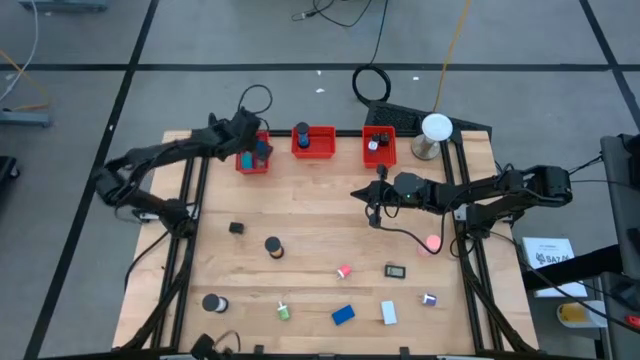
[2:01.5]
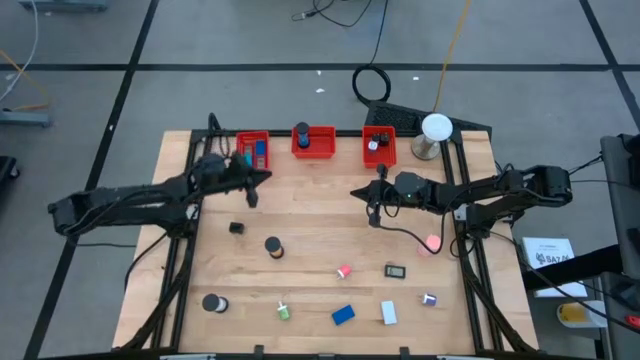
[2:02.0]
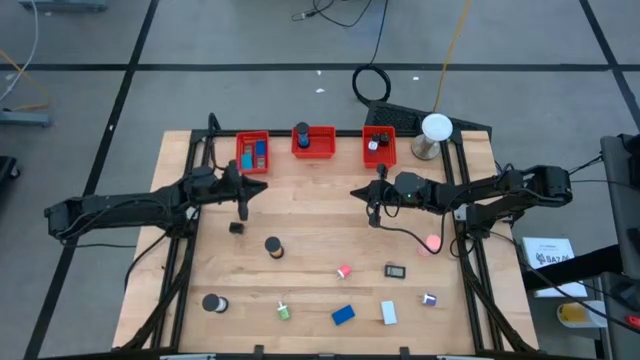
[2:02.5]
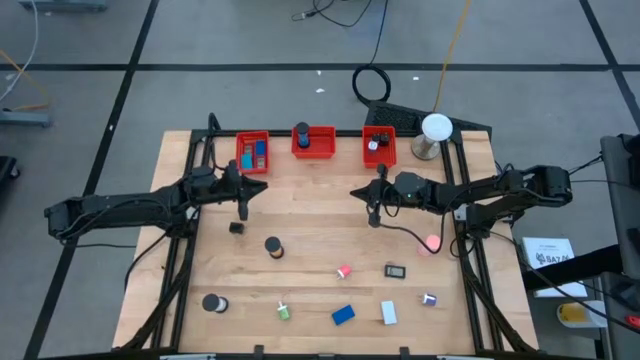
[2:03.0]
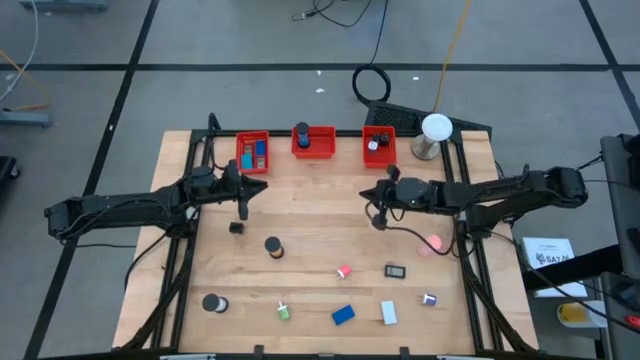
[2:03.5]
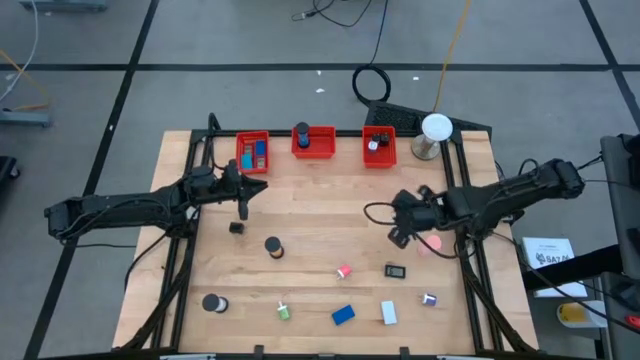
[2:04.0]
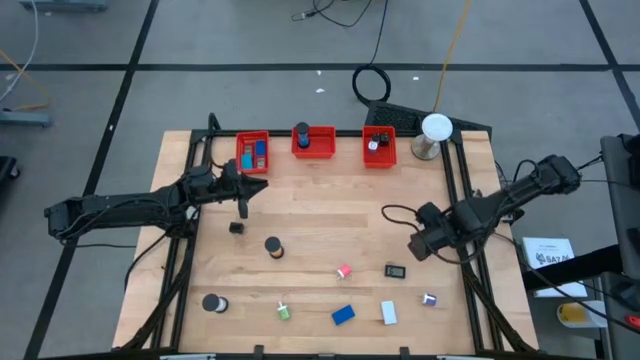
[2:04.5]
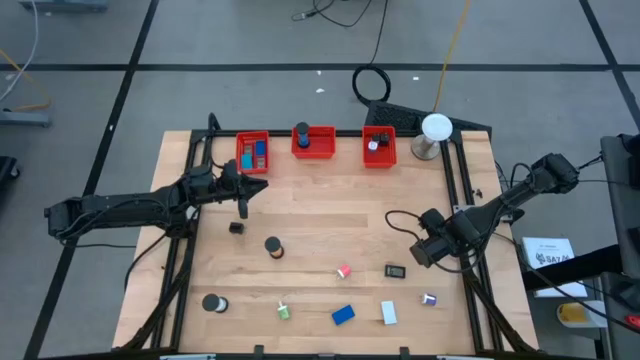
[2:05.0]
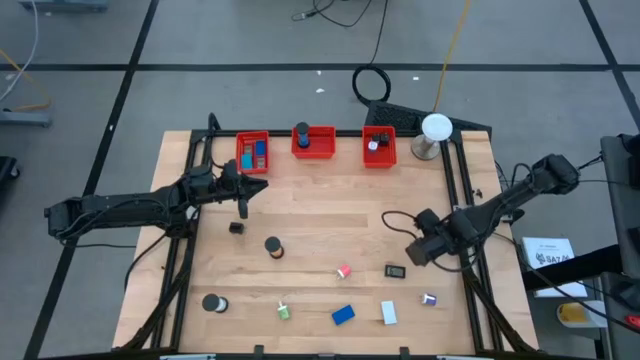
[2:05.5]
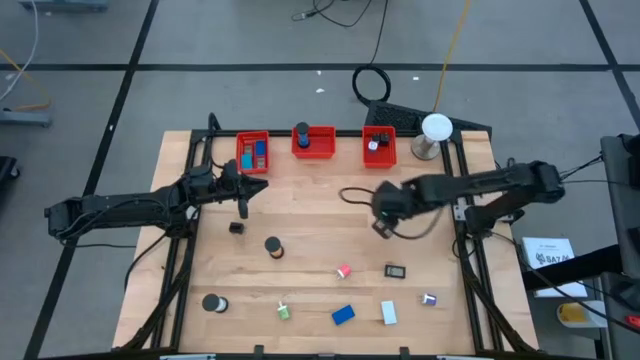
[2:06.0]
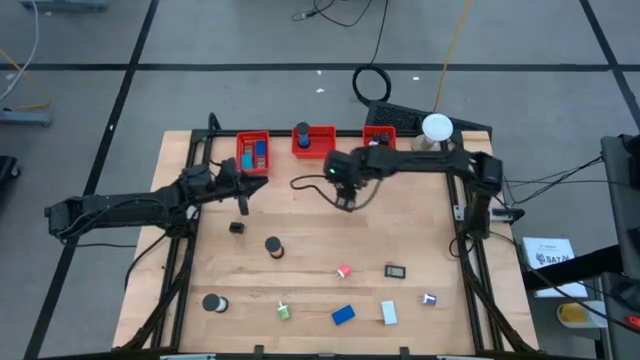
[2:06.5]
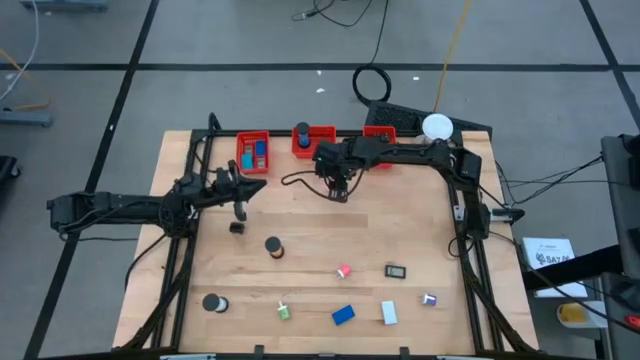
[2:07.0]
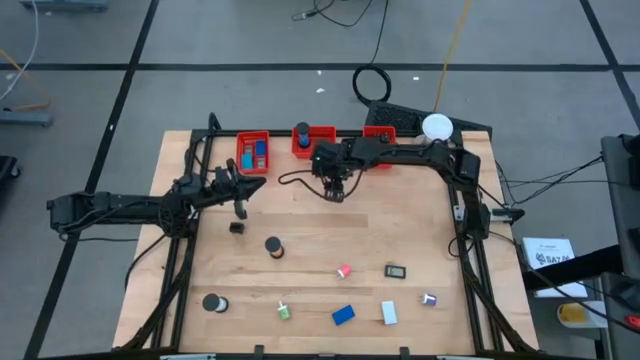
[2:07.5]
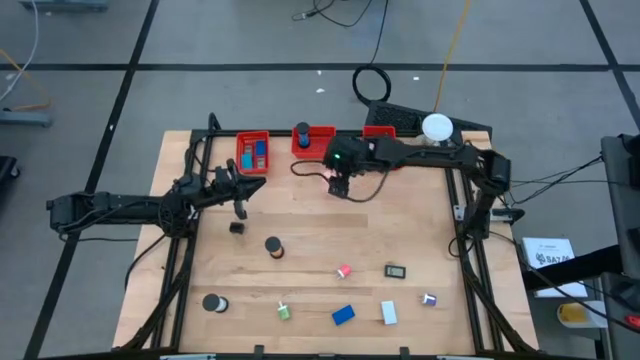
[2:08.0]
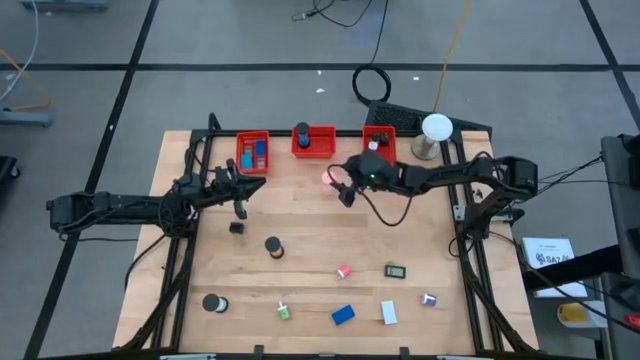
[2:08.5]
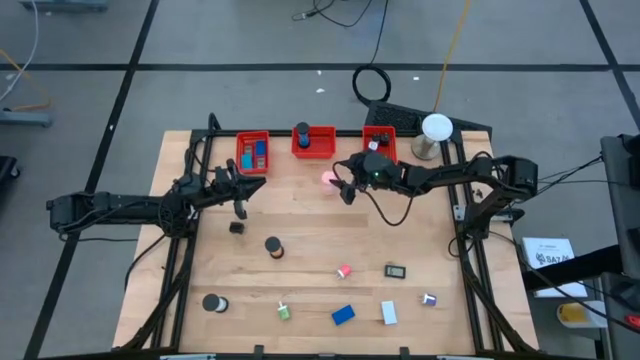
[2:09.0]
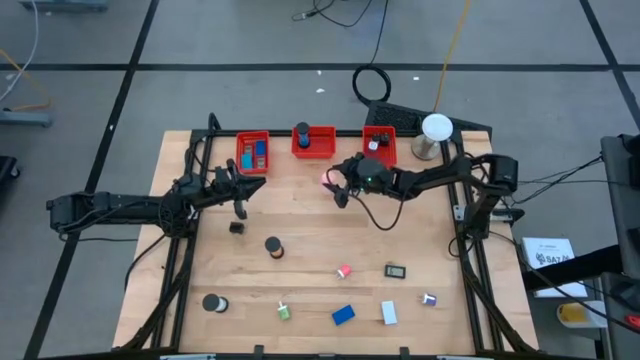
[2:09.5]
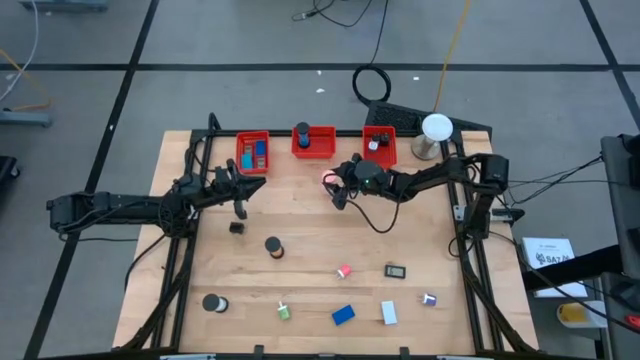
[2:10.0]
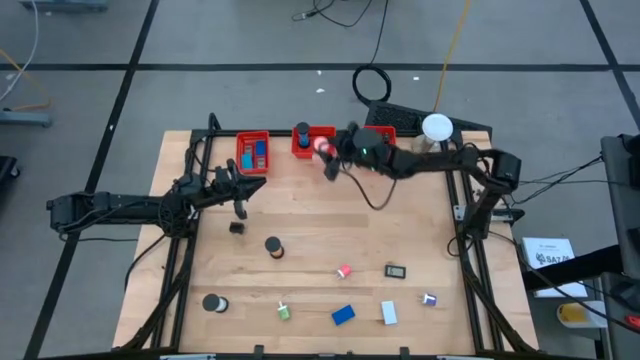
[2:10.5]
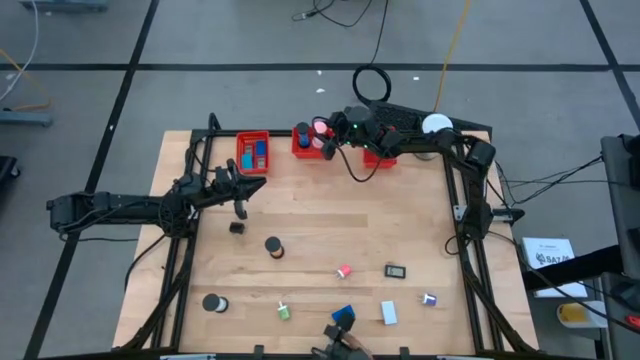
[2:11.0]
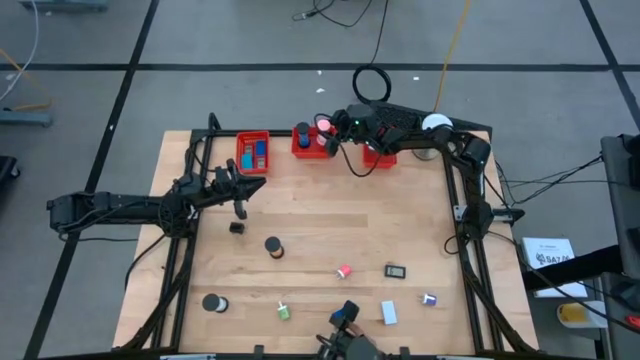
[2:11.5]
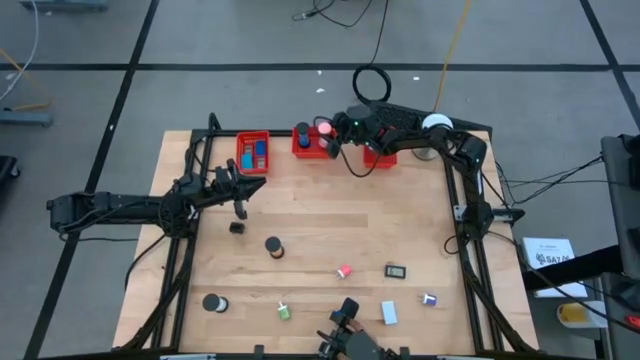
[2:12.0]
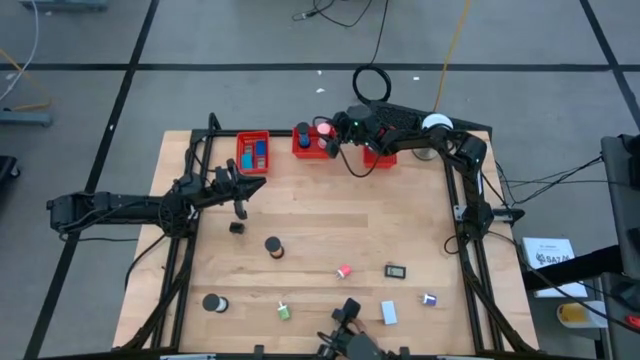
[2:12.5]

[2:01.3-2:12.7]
Task: Pick & Place Office items
Put the pink hourglass into the middle orange basket

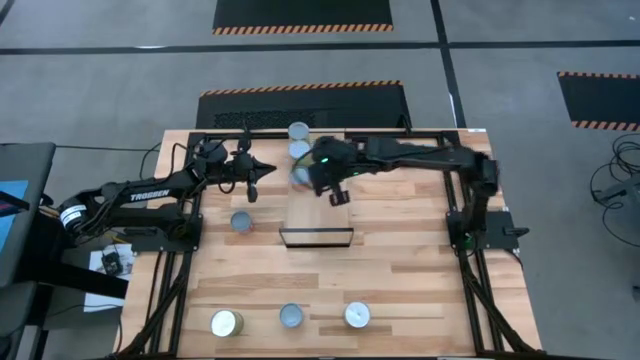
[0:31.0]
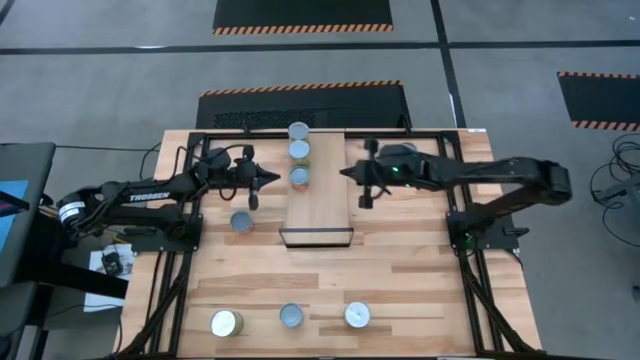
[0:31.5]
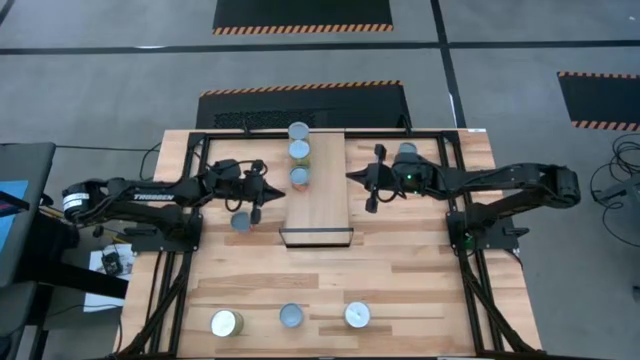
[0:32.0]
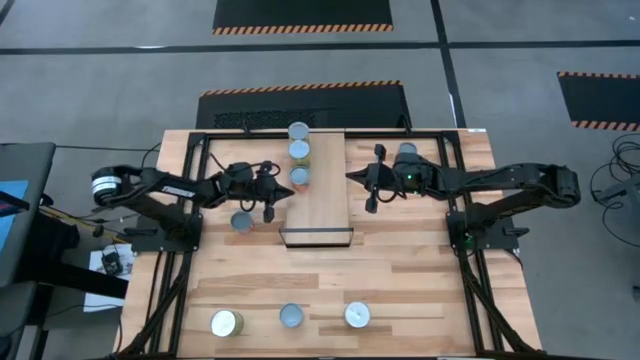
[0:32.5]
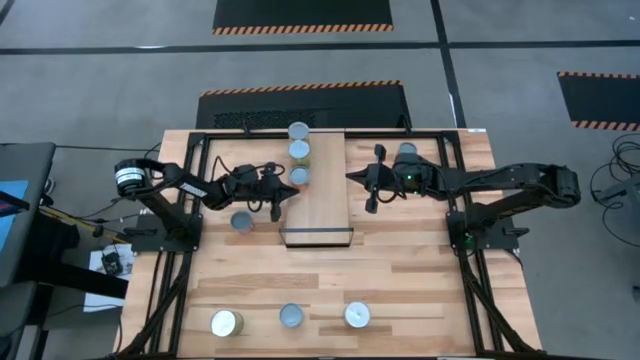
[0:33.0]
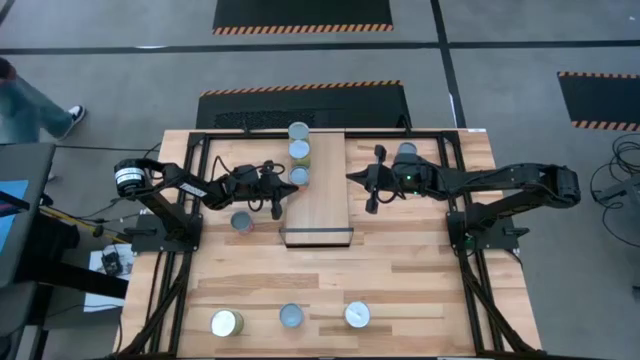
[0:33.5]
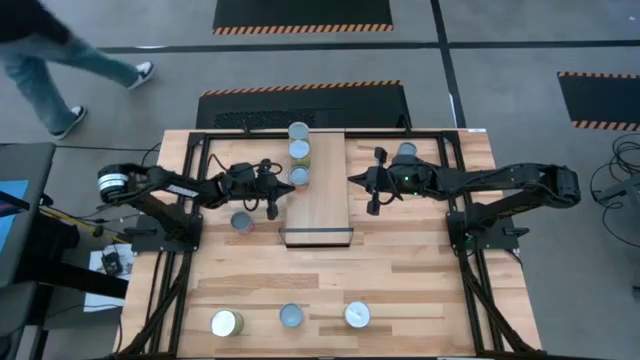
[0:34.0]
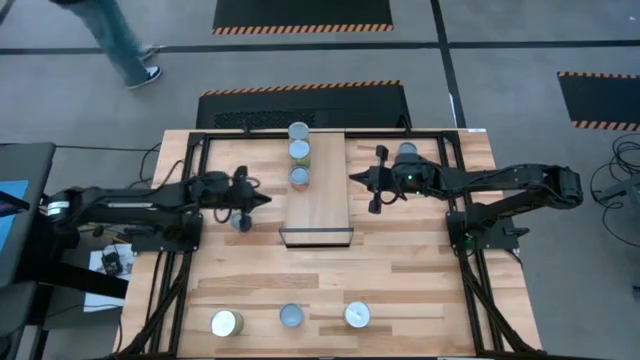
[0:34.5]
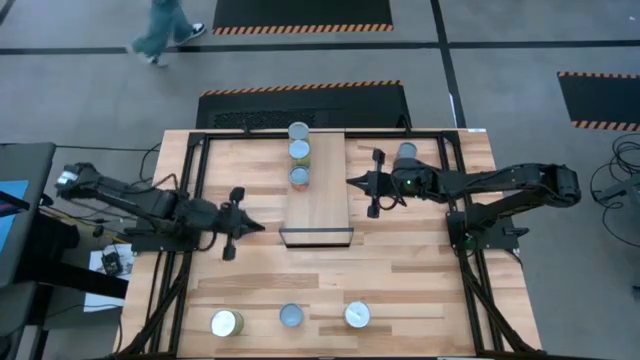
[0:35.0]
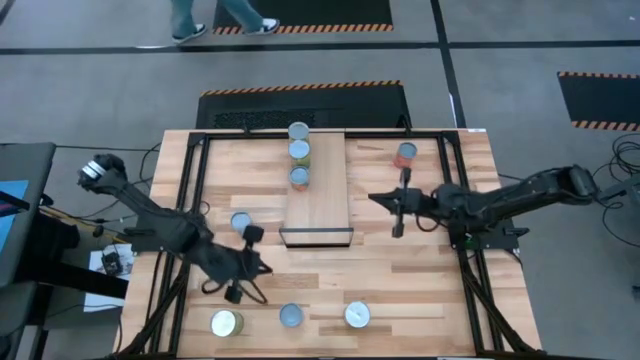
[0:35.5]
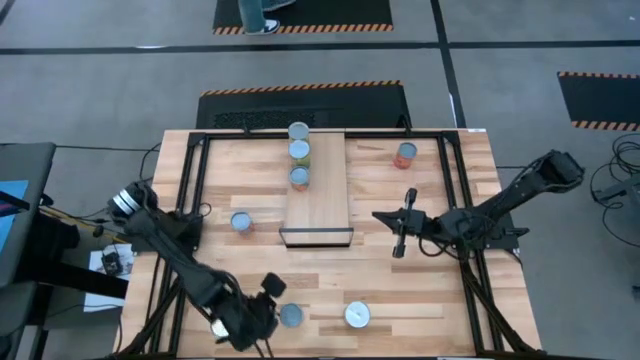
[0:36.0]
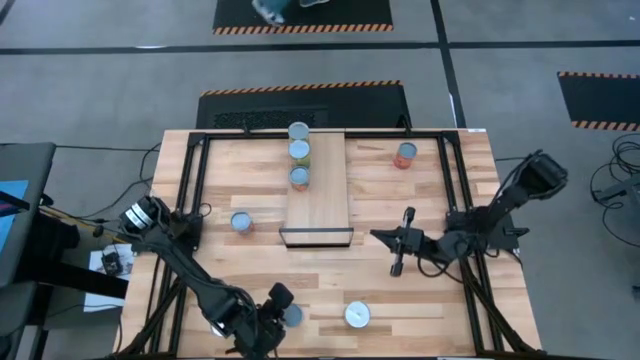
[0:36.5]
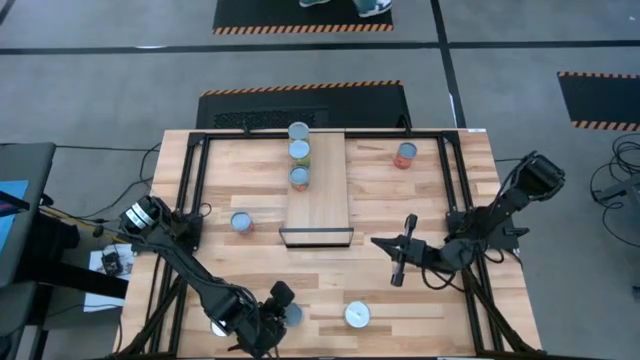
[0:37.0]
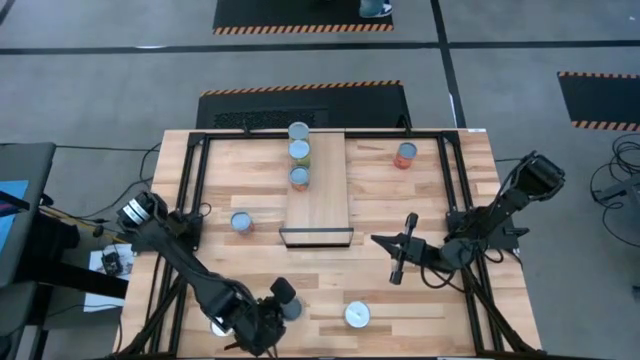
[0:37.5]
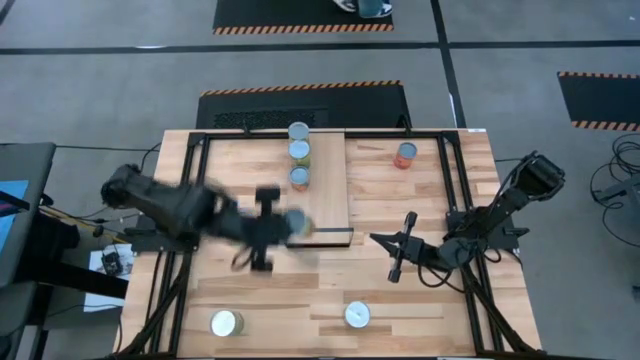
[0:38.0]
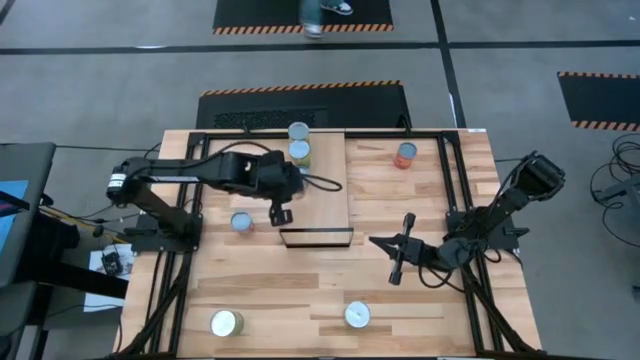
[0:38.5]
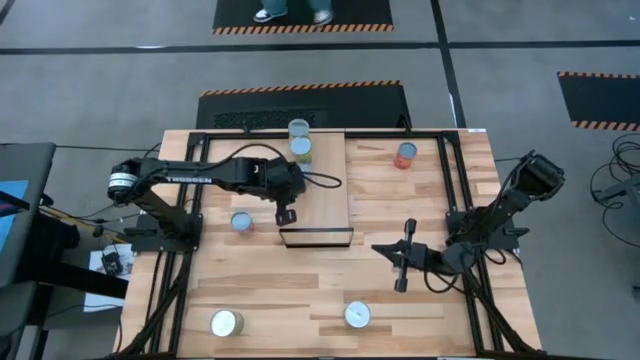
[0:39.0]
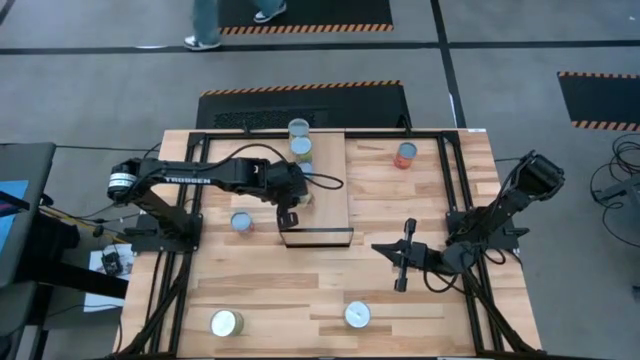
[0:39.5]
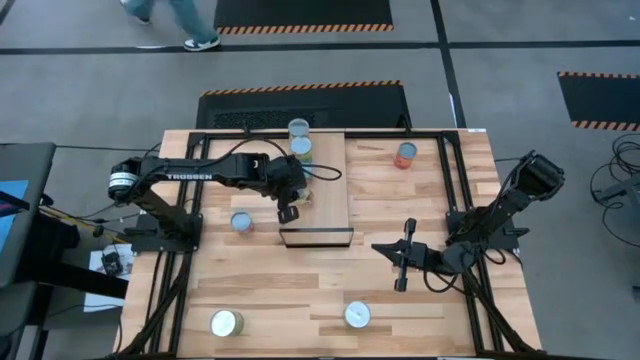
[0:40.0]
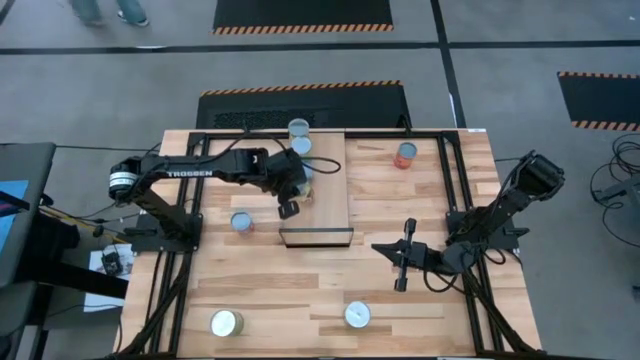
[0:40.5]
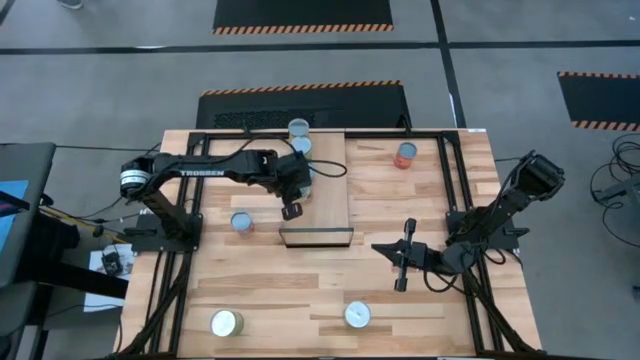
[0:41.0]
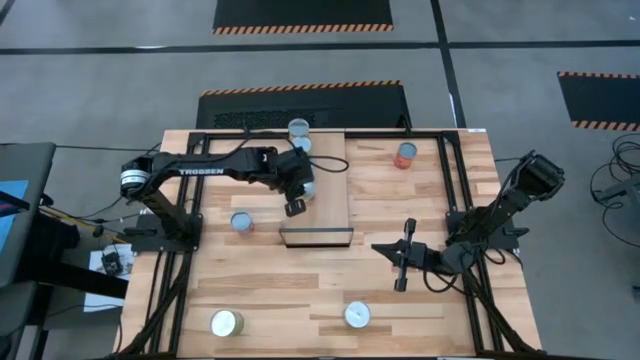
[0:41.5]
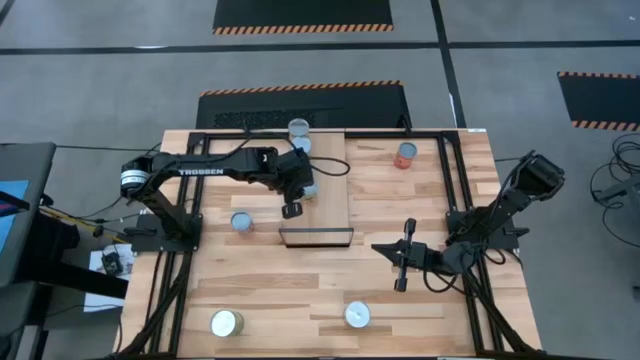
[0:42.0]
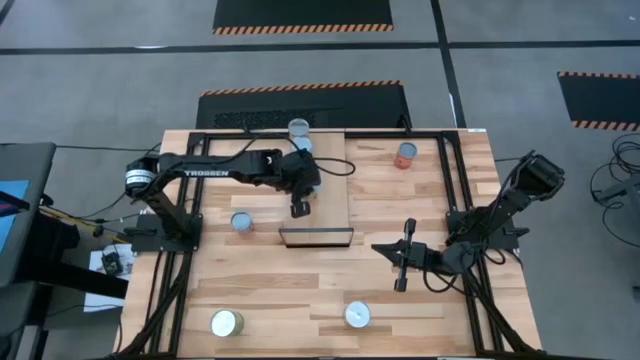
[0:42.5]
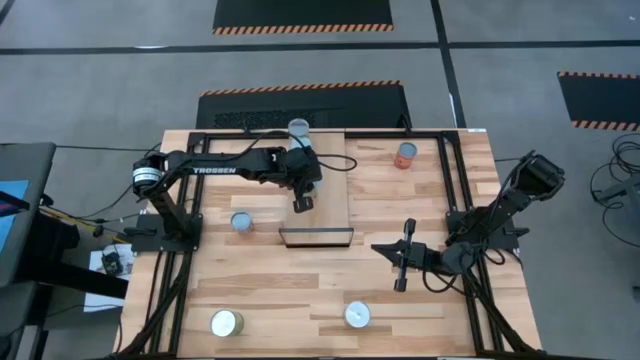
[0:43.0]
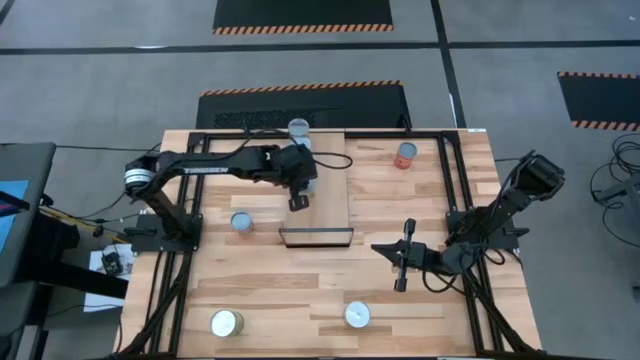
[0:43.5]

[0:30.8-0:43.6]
Task: Pick and place cans onto a shelf
Put the canned spaghetti sauce on the shelf
